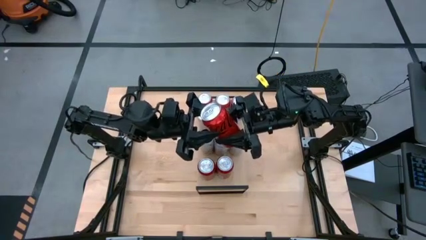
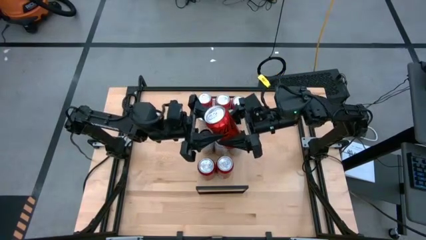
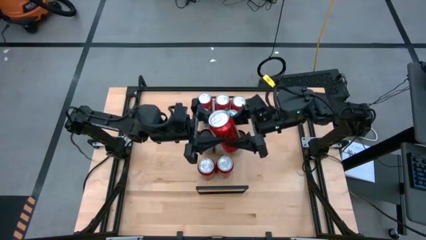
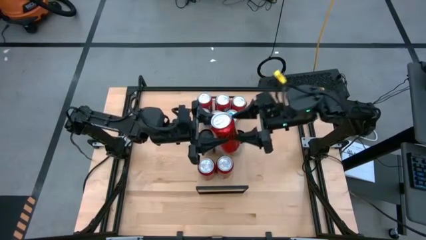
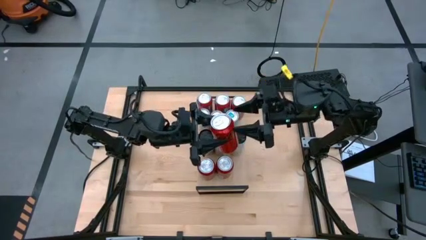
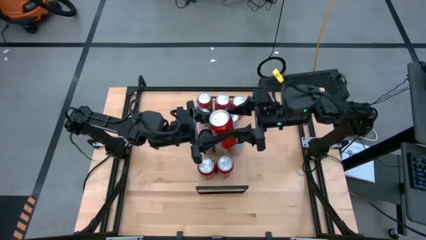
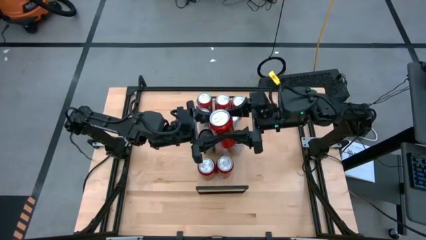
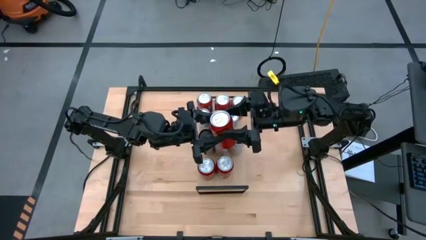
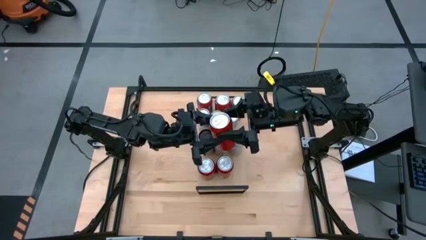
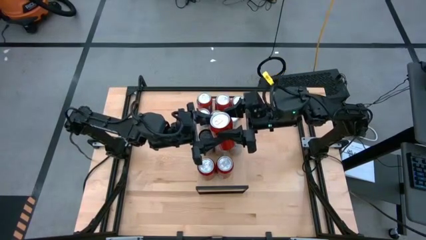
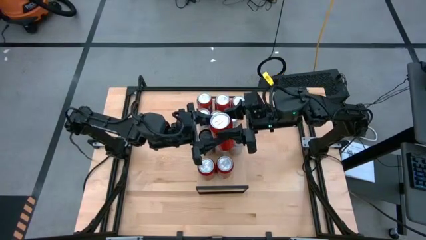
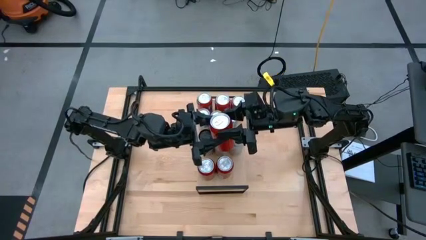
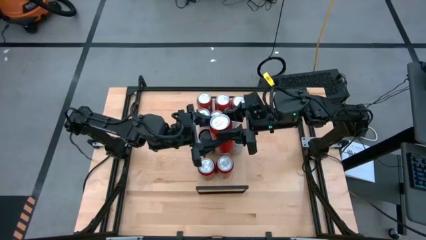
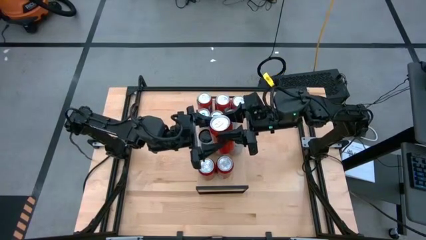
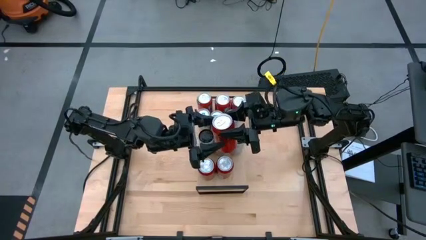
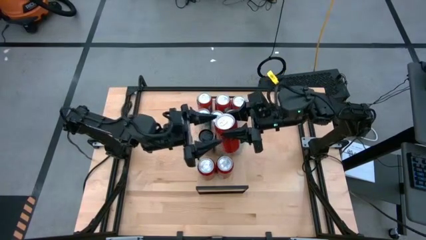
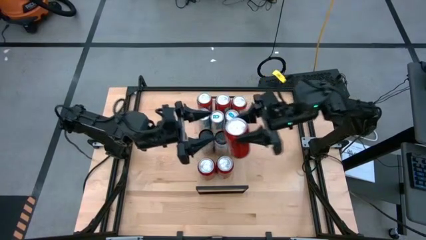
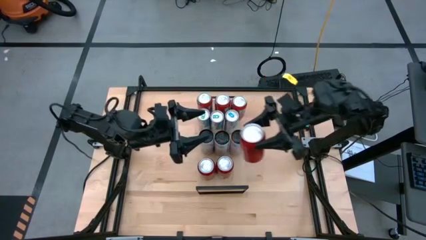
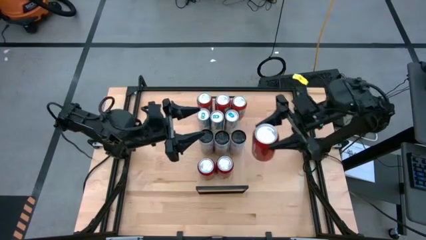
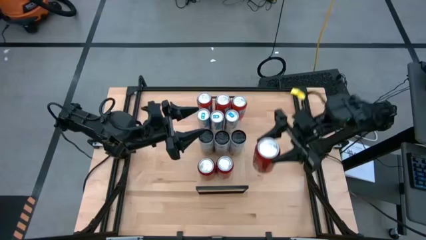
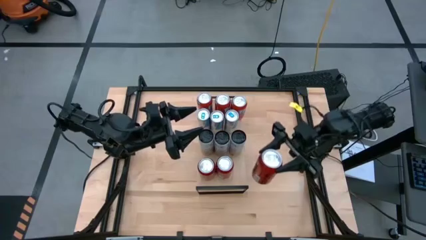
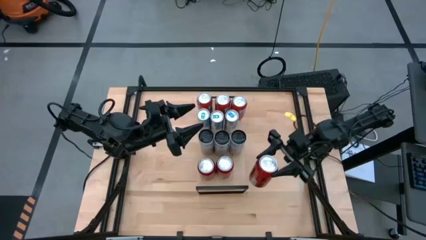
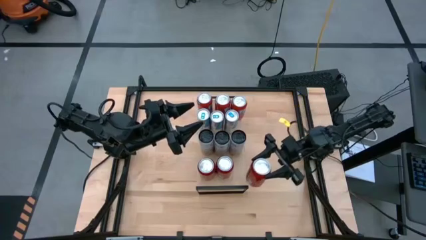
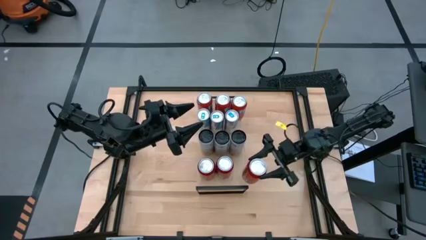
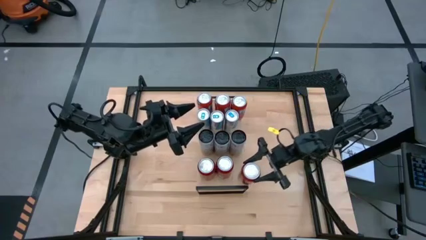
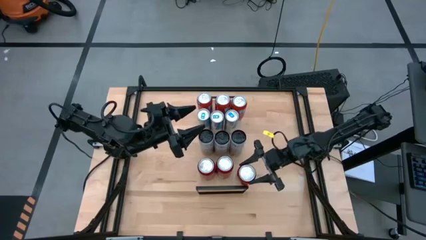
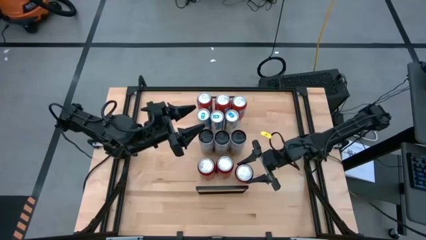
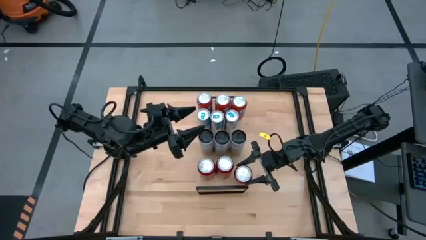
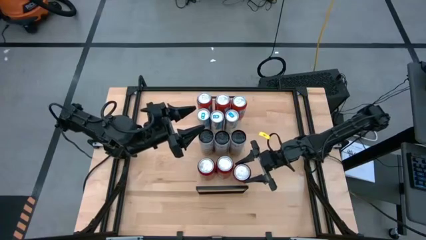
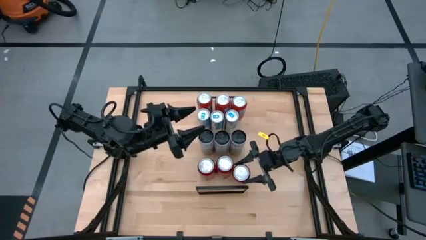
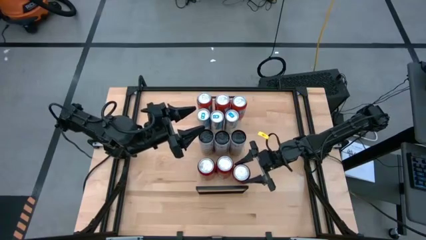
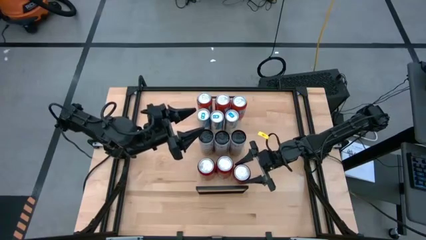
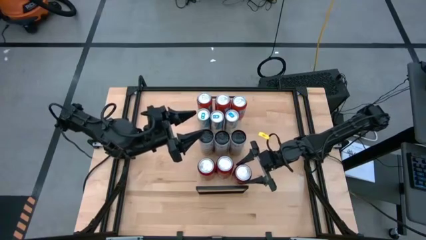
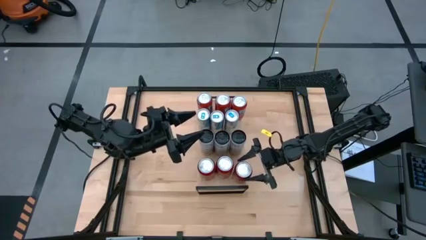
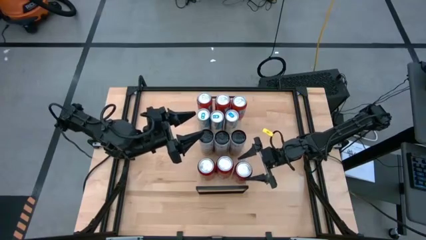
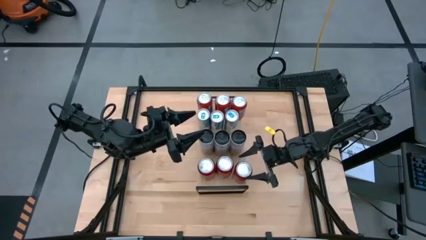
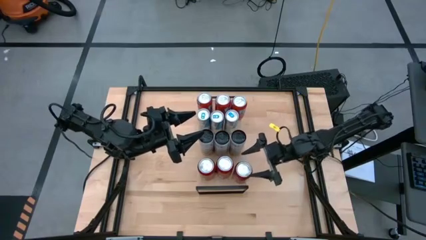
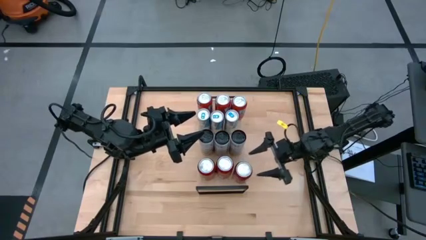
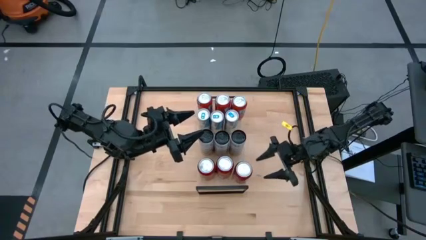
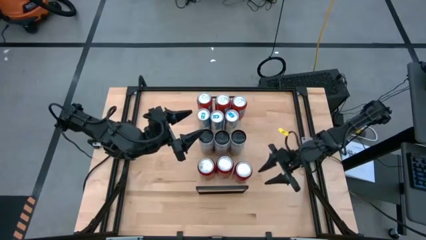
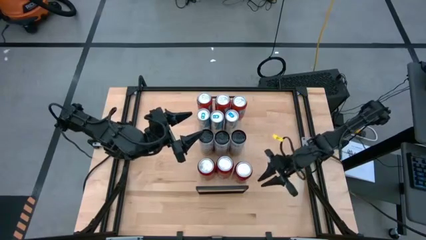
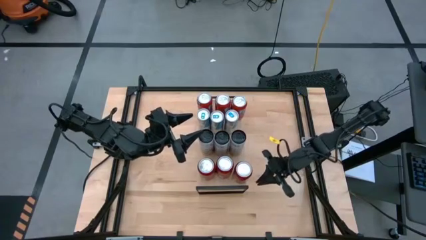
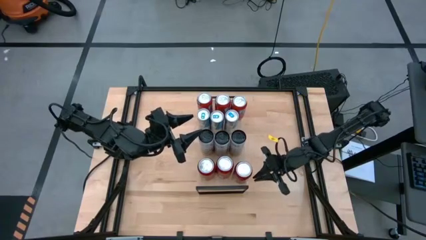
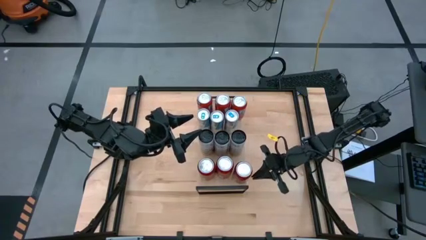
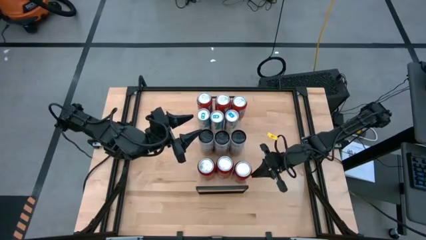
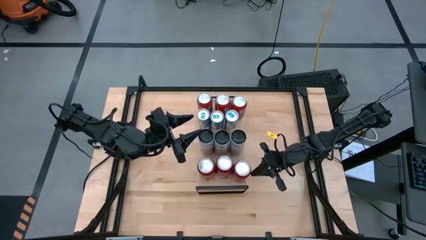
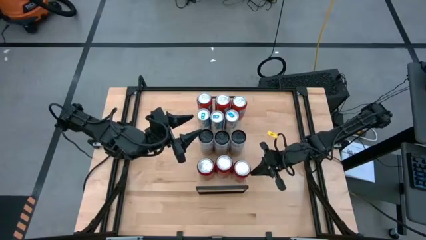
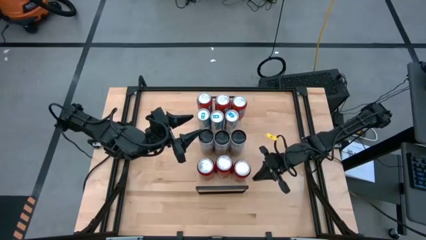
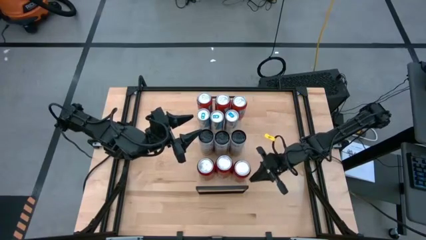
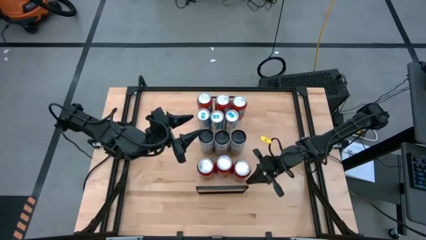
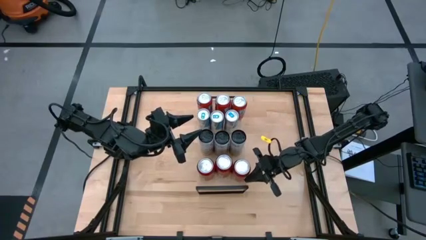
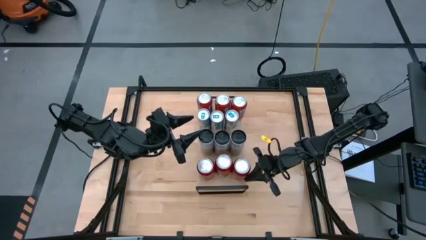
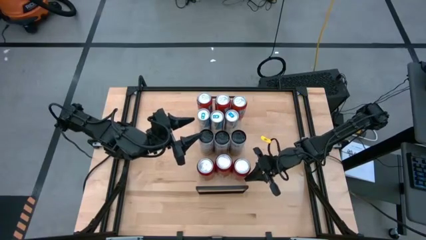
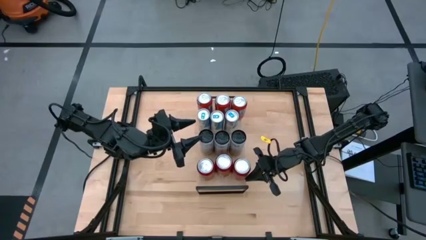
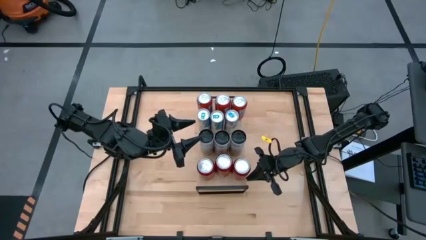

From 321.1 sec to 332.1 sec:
Task: Place canned beverage on shelf
Put the red soda can on the shelf aligned with the other red soda can
